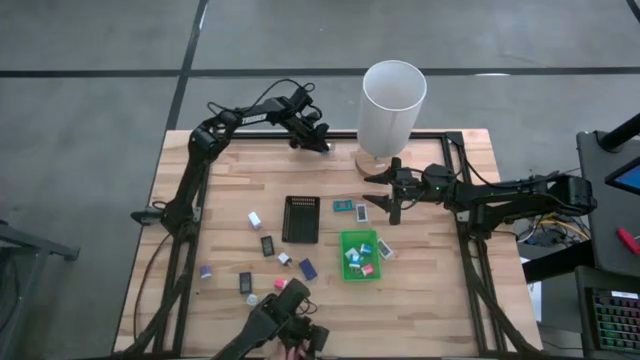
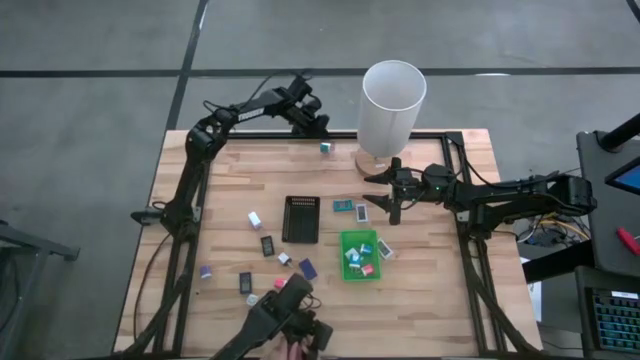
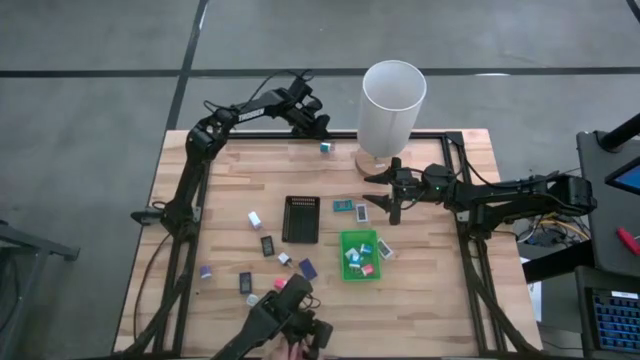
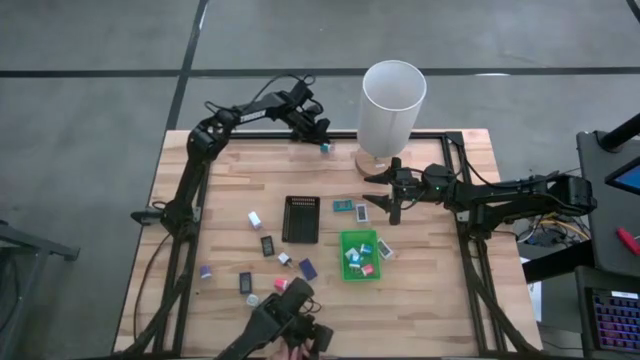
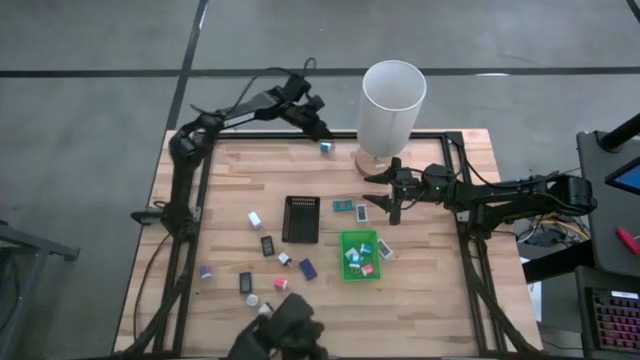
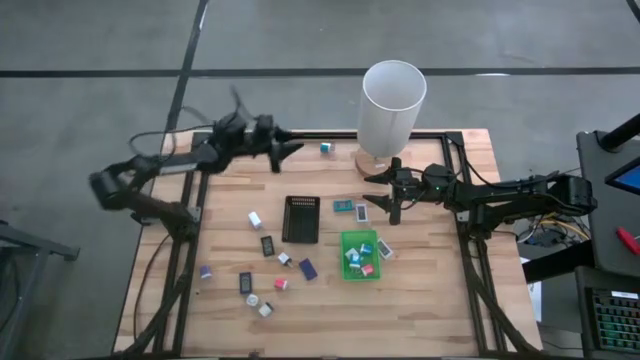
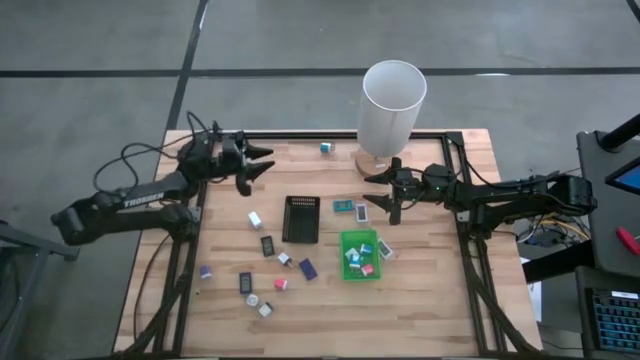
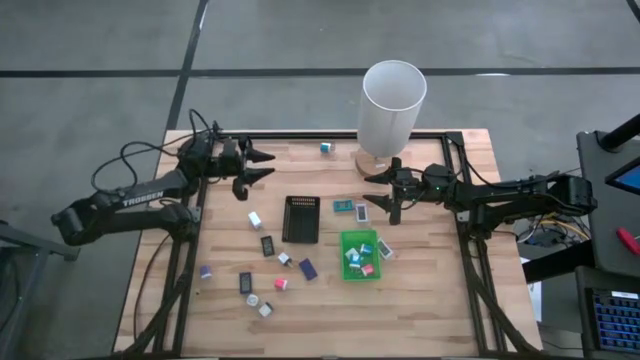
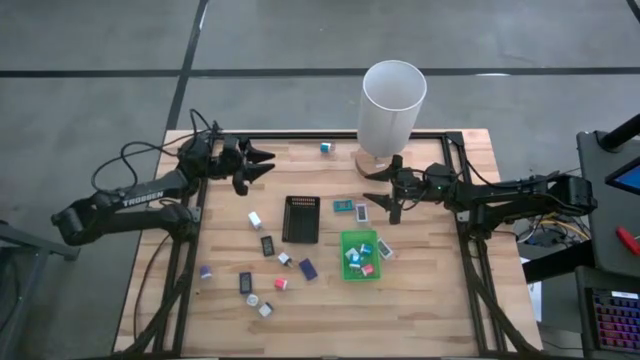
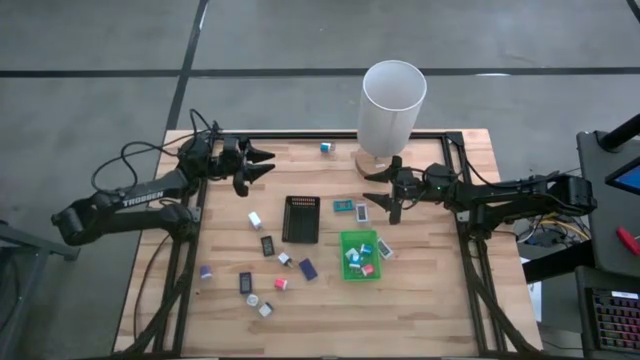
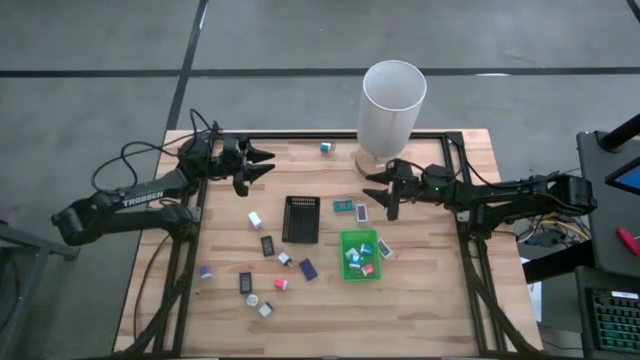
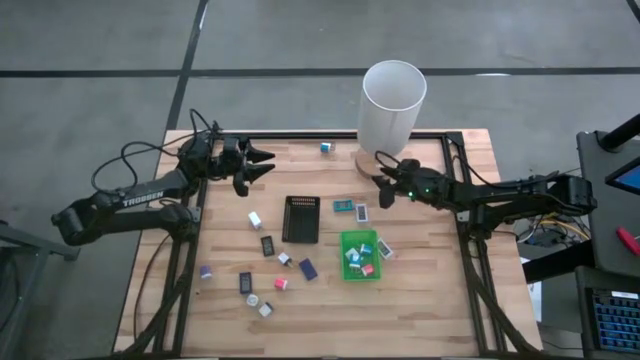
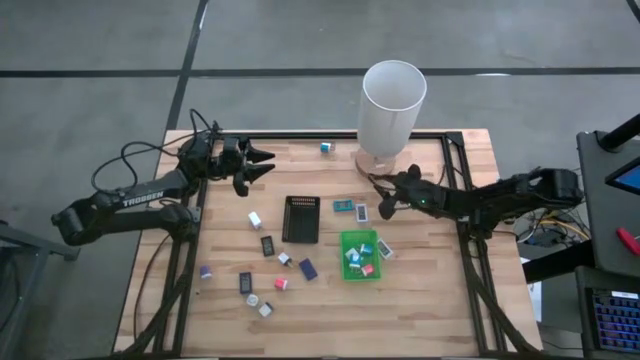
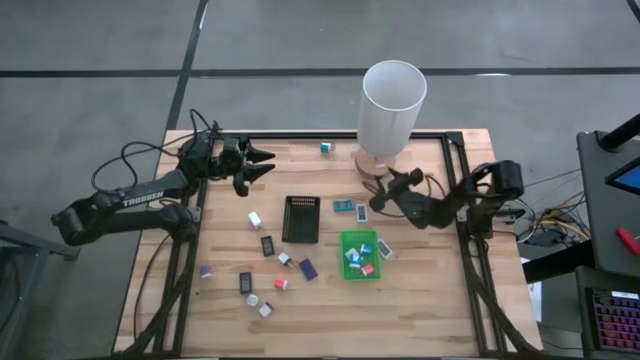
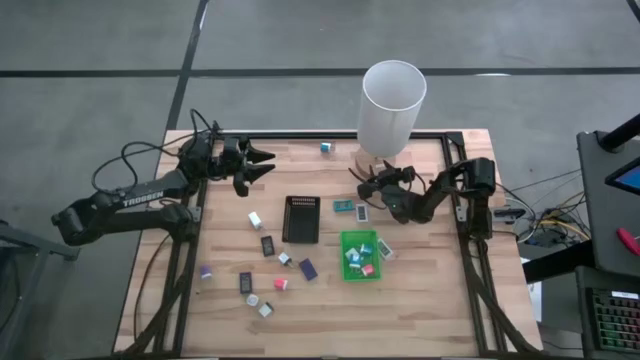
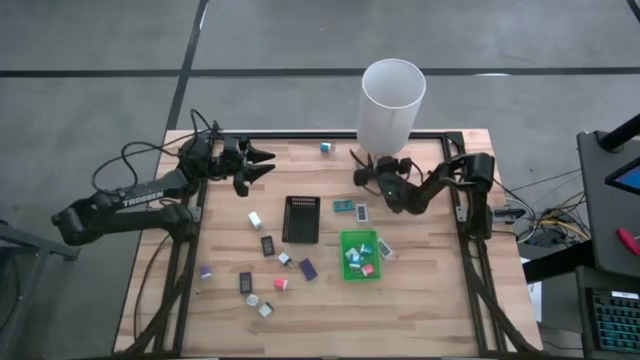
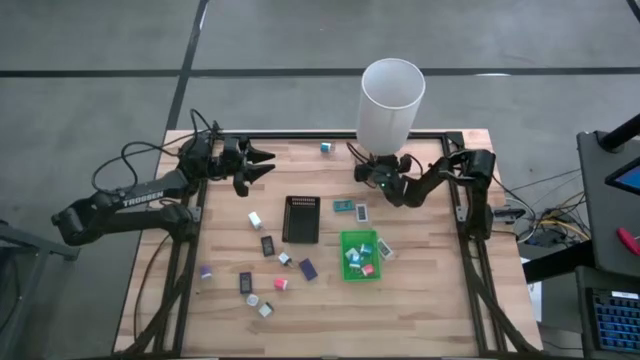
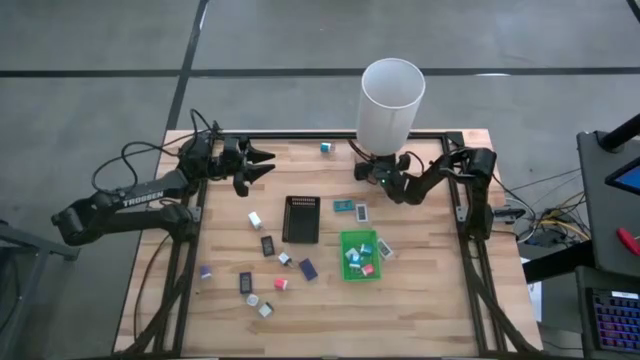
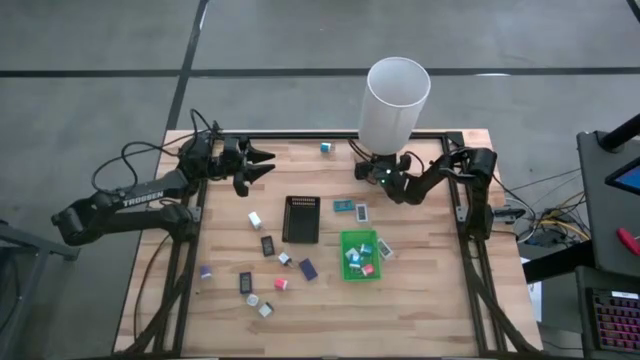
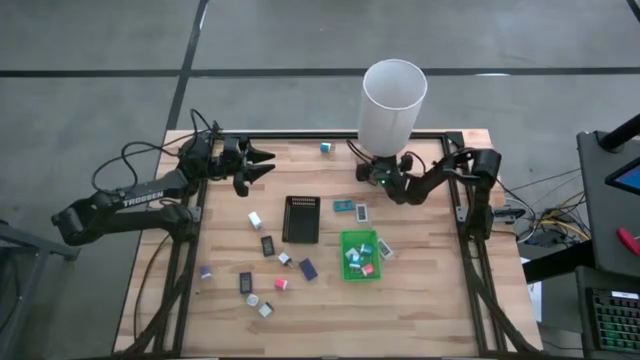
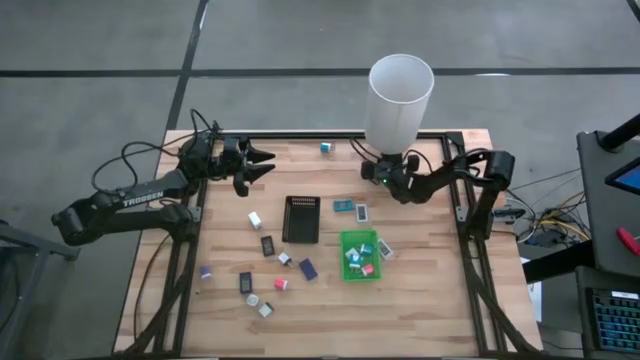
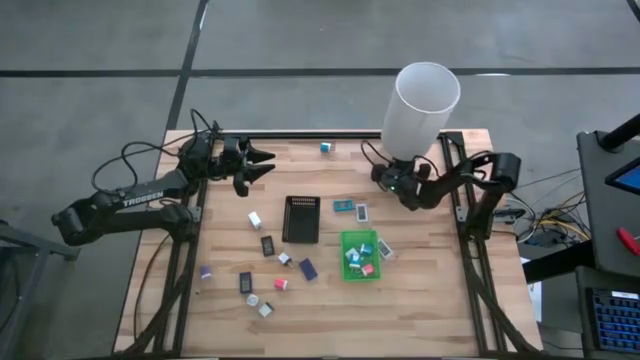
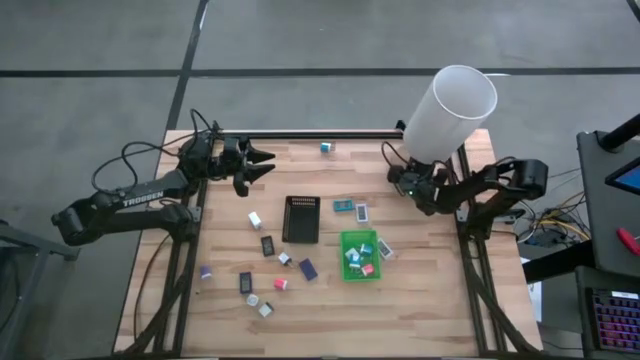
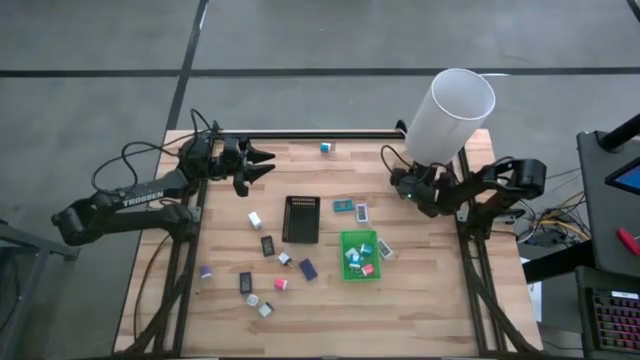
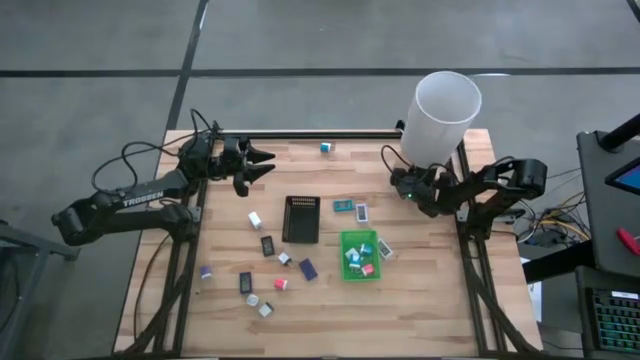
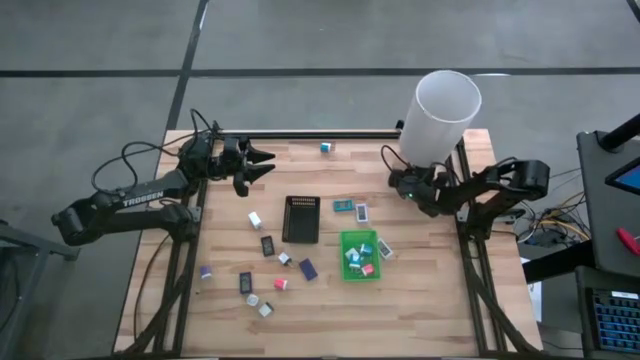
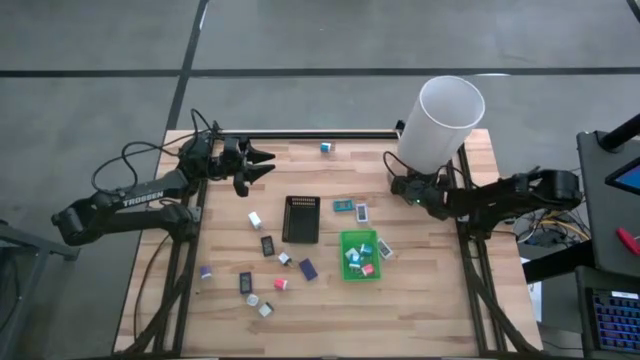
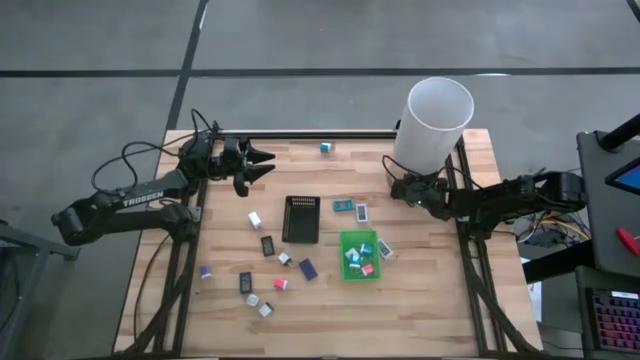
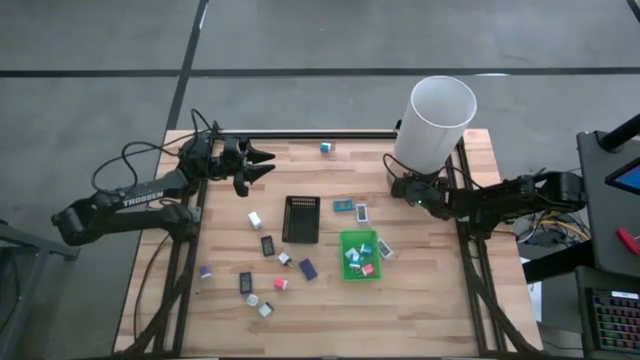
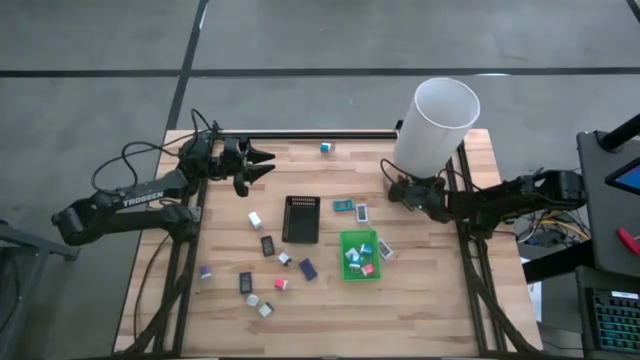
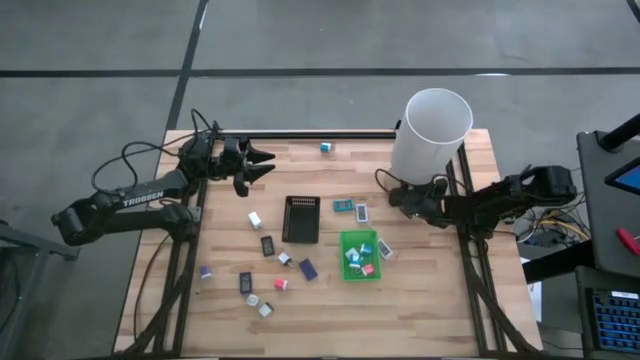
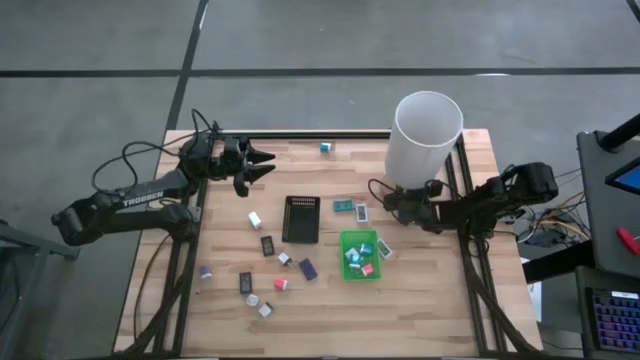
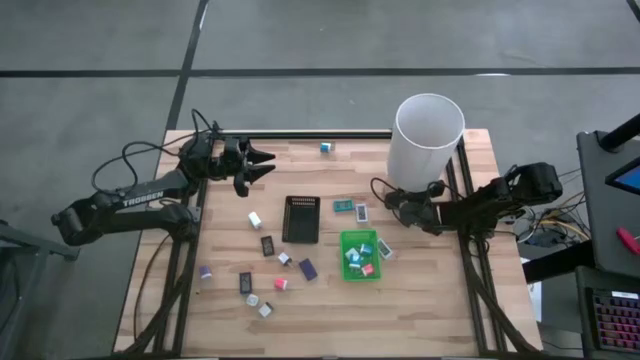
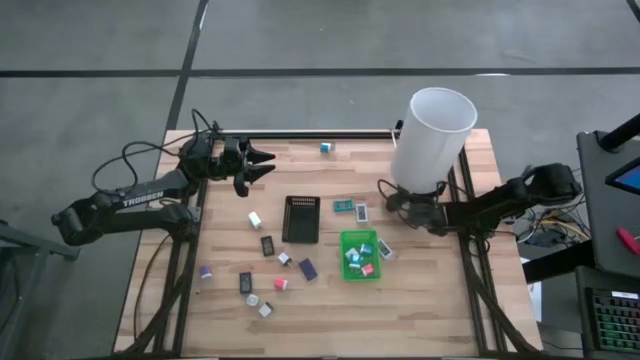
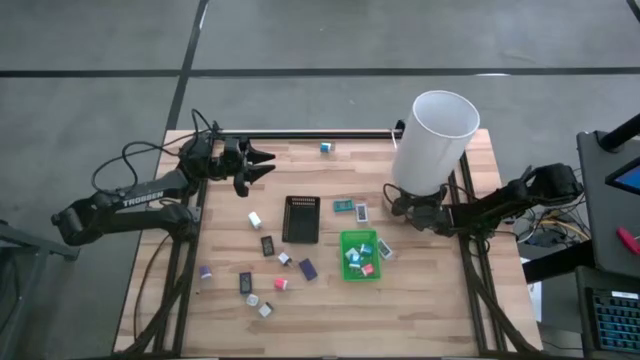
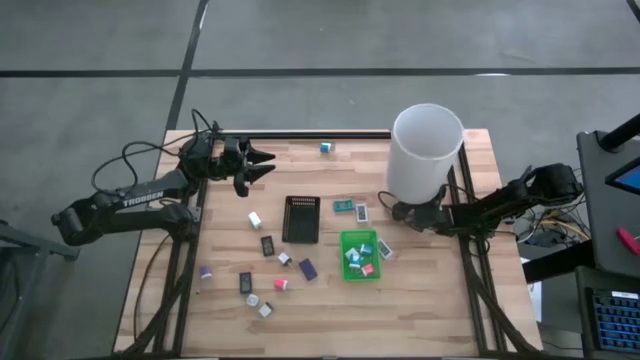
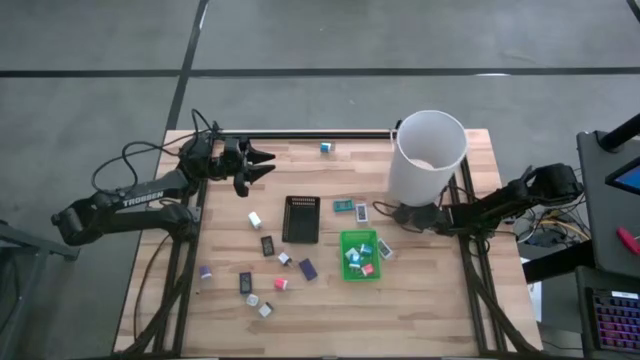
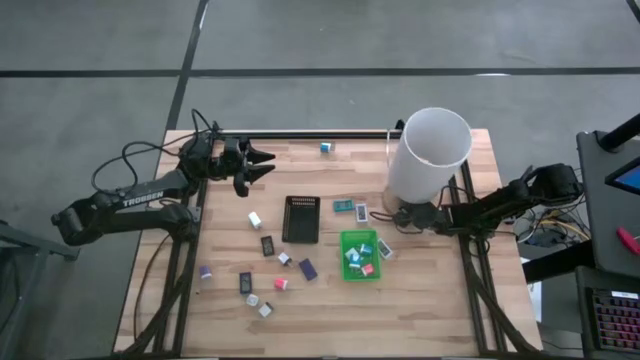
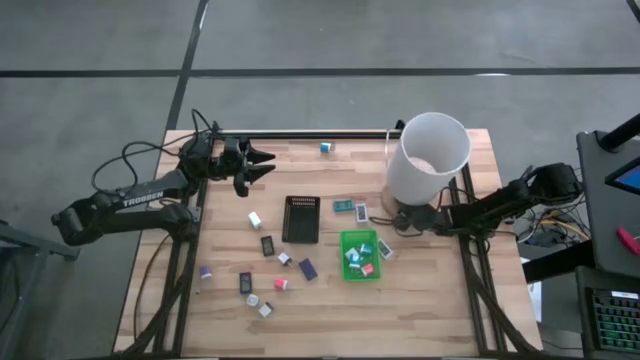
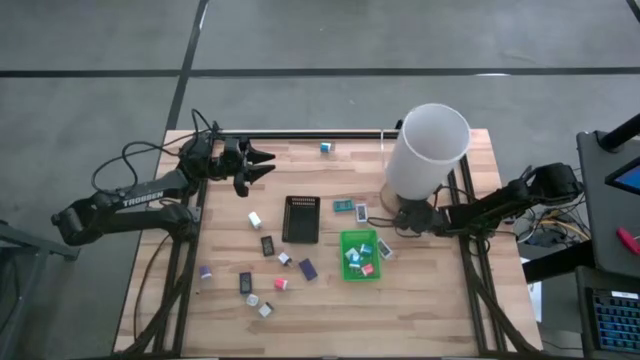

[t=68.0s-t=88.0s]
Task: Pick & Place Office items
Adjust the white lamp

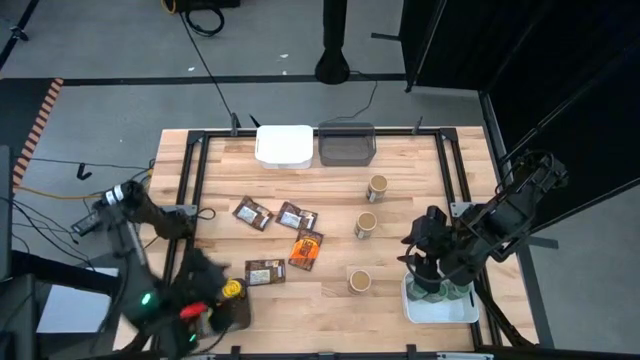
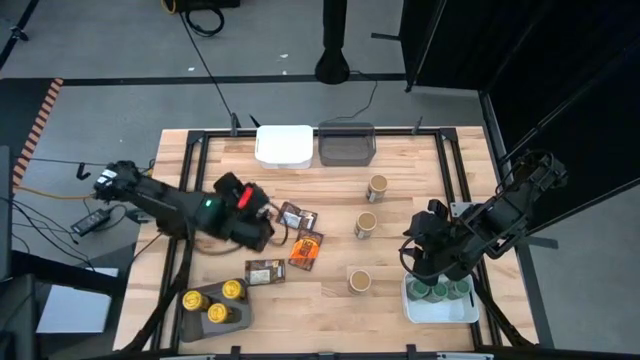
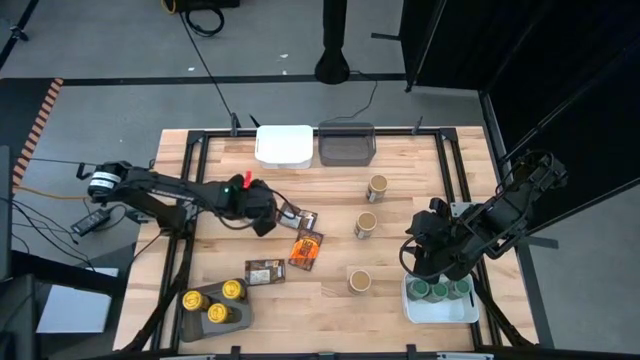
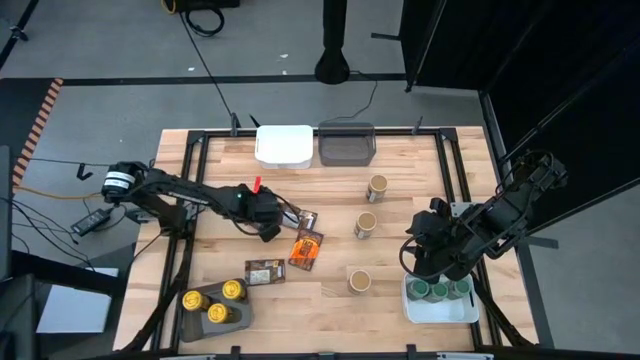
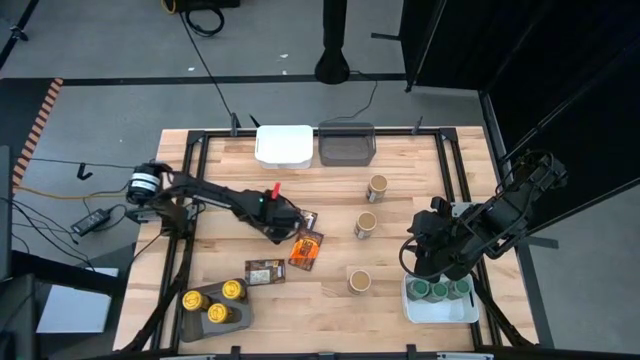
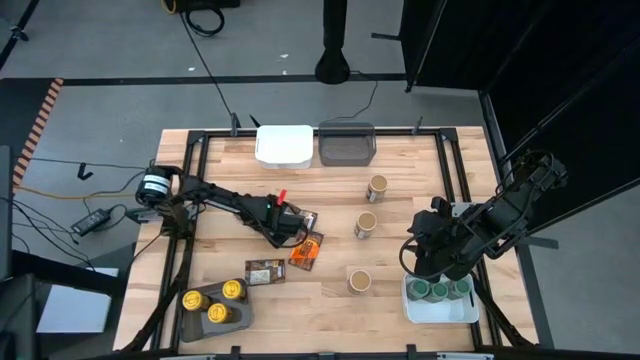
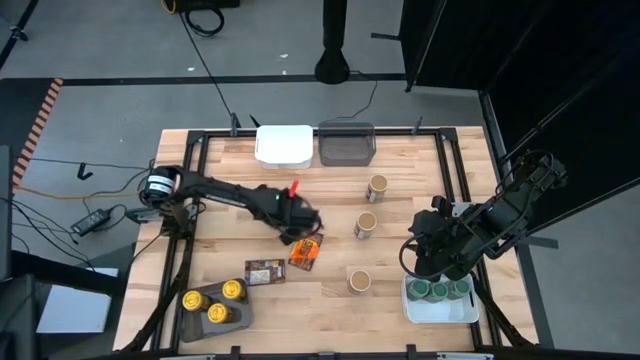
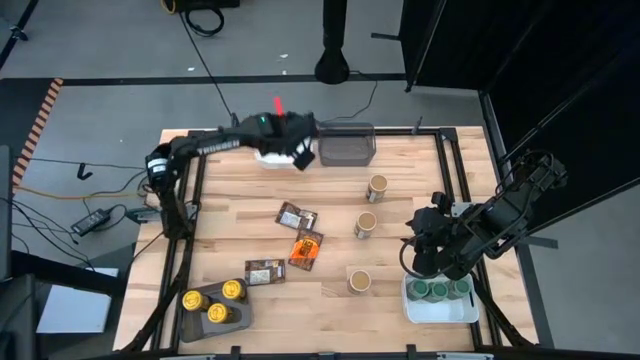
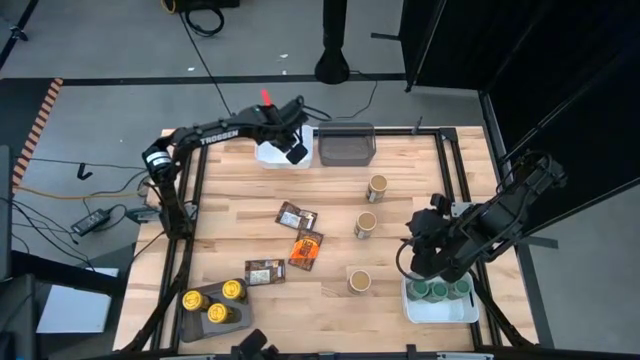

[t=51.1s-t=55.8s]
Task: Sort spices by type
Put the orange seasoning pack into the top white bin
